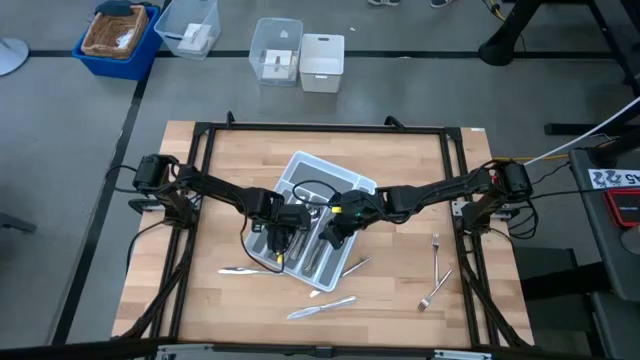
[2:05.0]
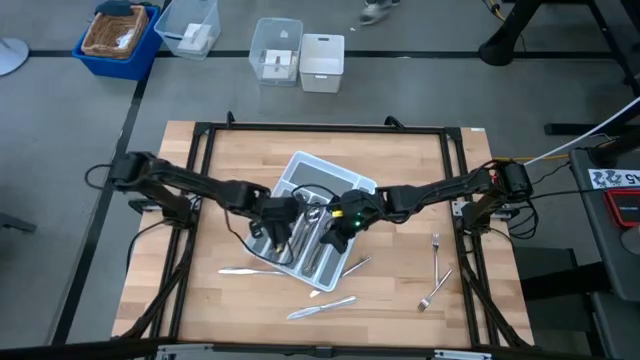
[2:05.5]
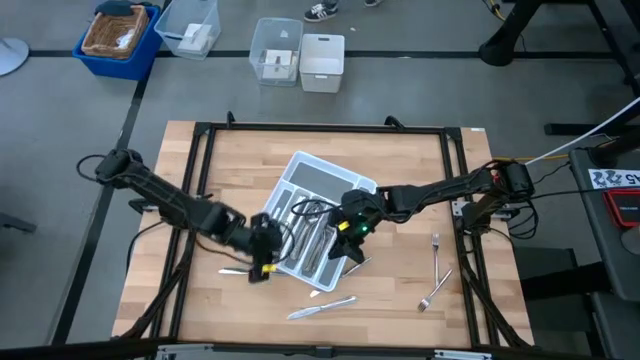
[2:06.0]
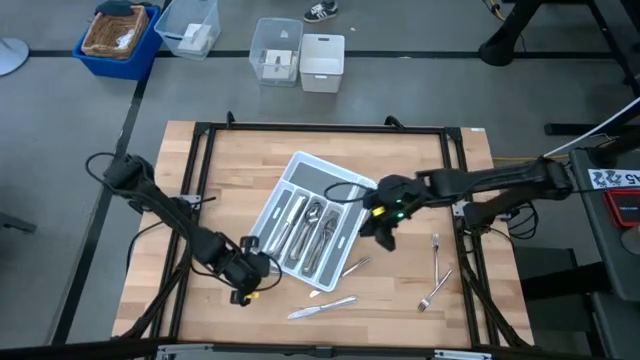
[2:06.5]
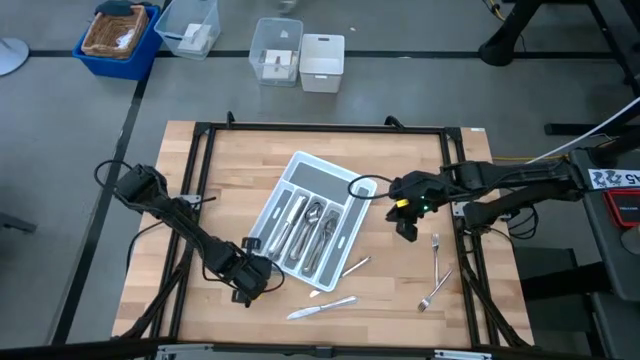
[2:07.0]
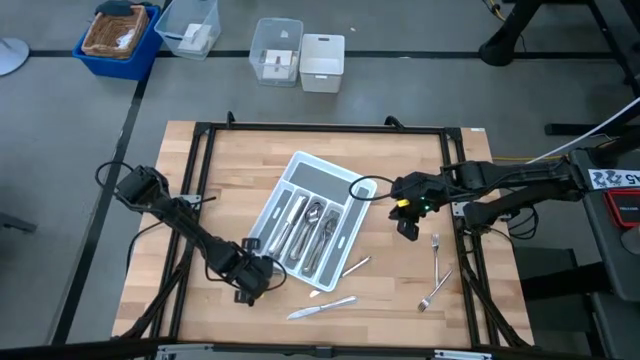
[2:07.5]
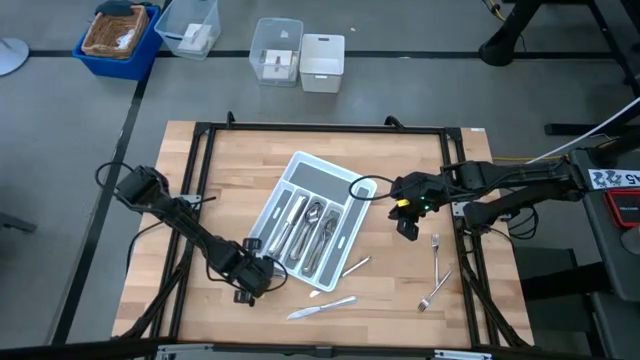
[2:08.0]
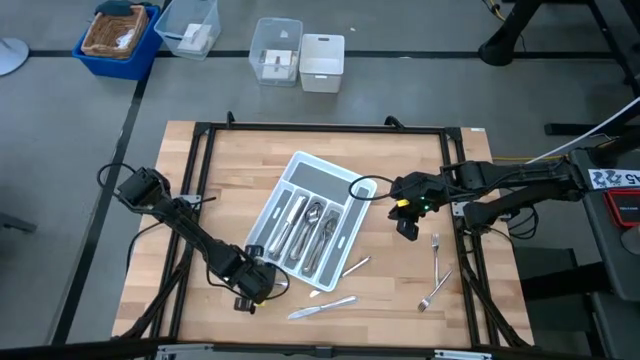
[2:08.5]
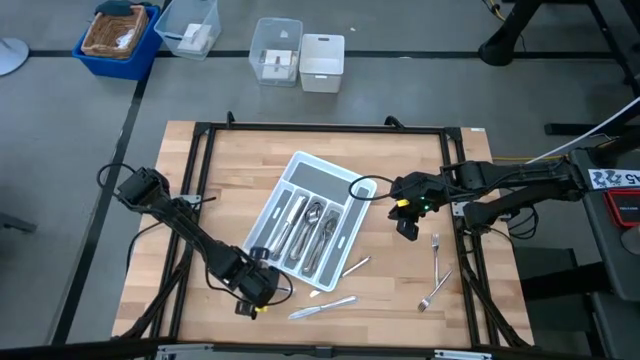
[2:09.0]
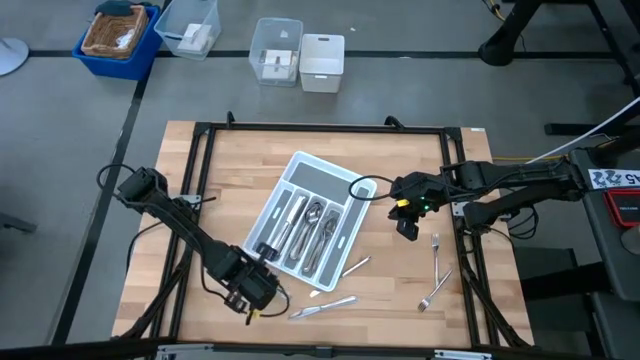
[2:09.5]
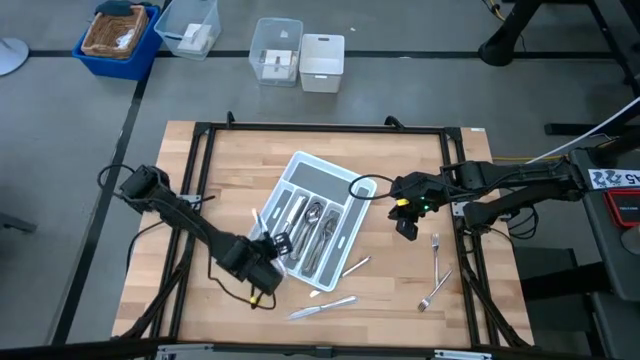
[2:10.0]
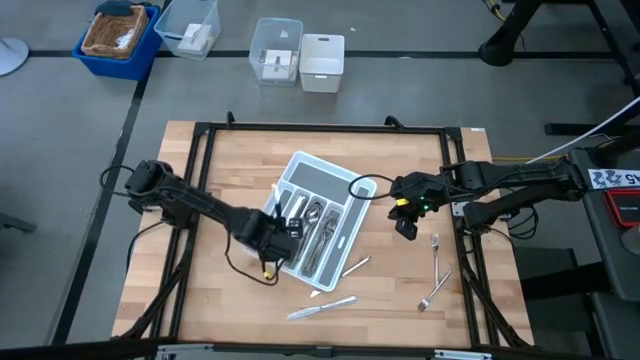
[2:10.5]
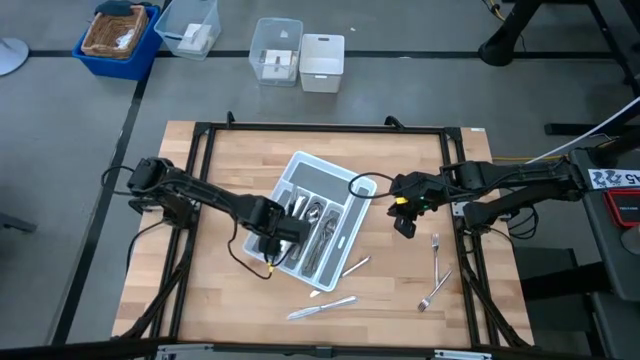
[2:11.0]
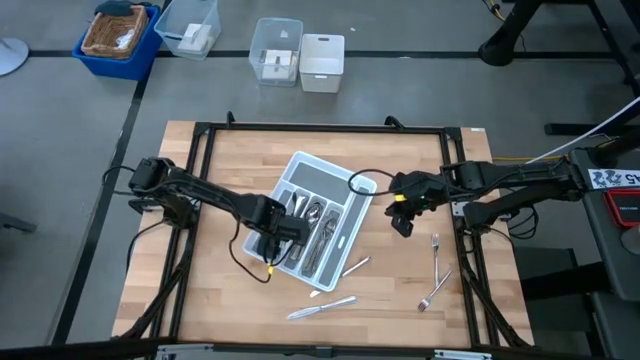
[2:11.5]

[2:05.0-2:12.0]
Task: Sort silverware
Put the silver knife into the white cutlery tray

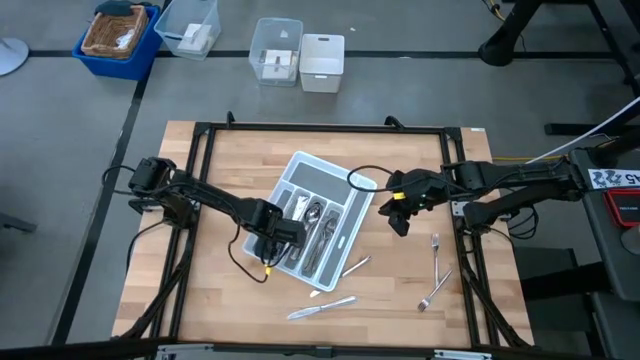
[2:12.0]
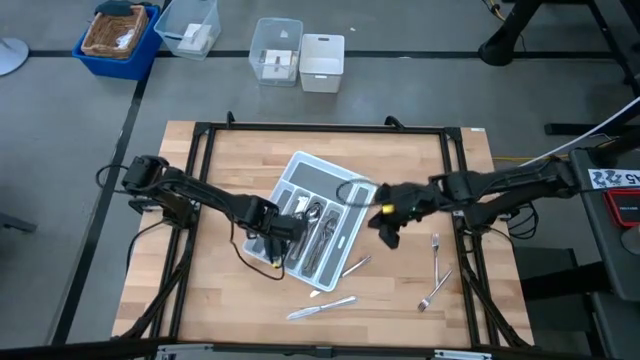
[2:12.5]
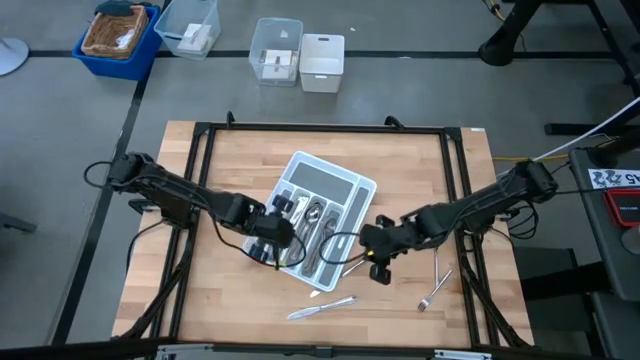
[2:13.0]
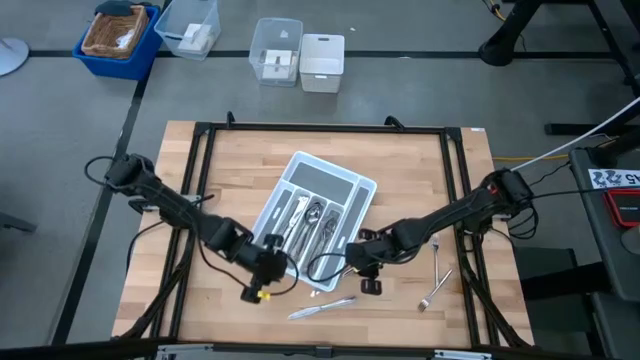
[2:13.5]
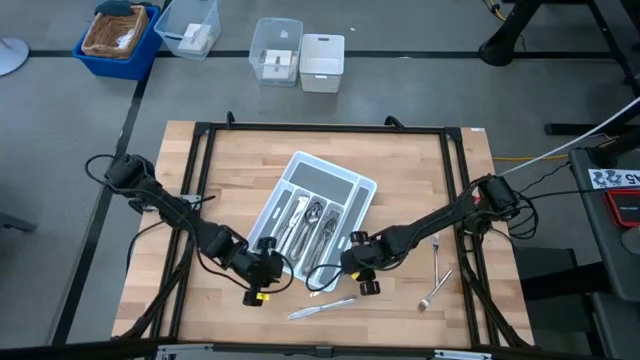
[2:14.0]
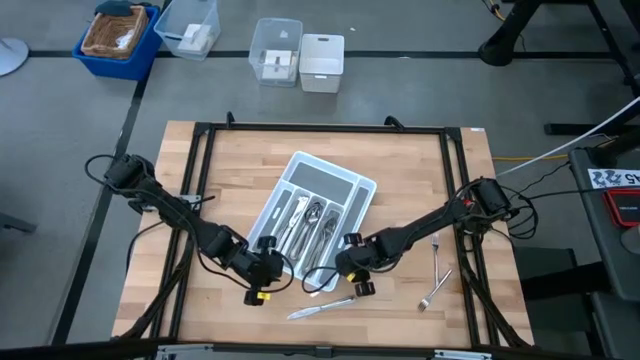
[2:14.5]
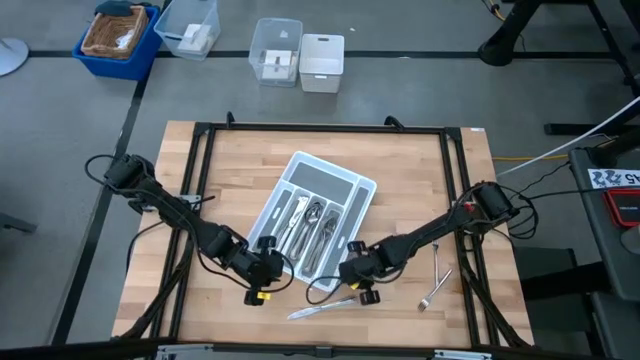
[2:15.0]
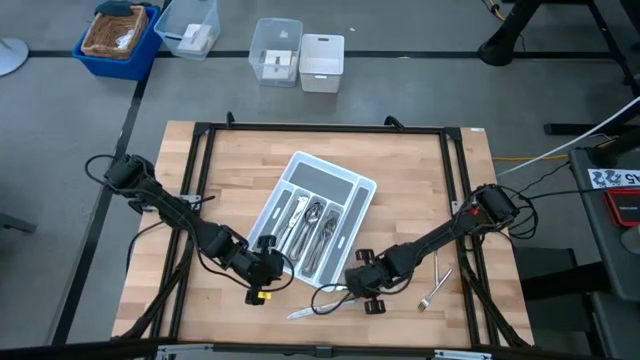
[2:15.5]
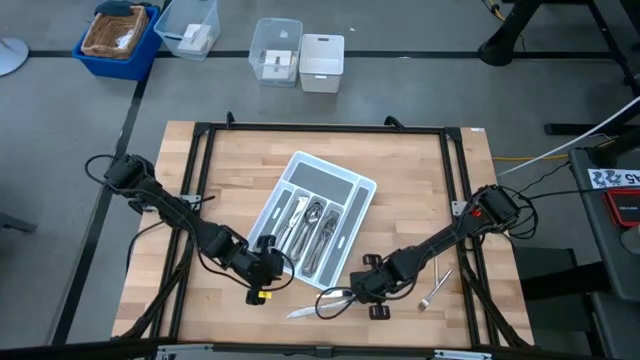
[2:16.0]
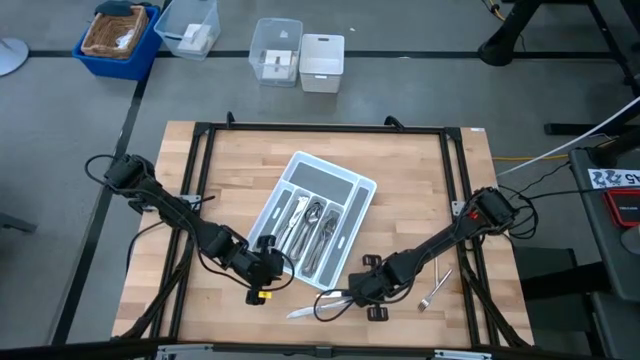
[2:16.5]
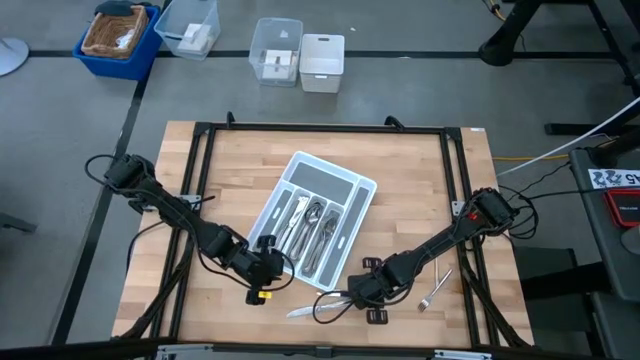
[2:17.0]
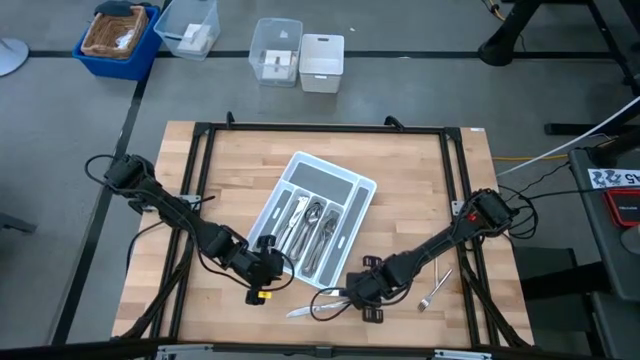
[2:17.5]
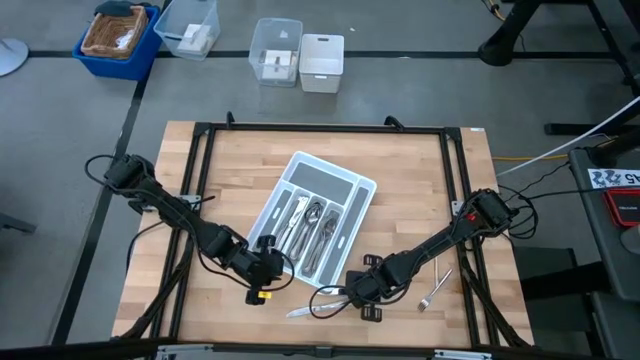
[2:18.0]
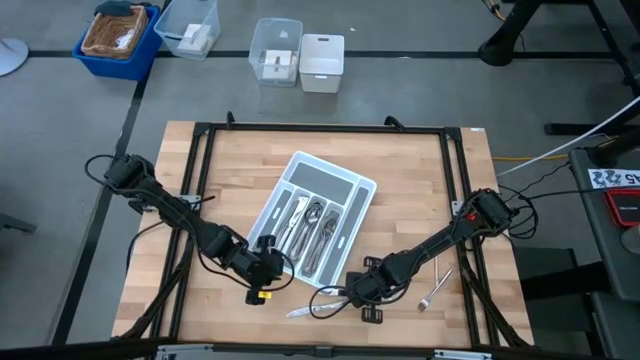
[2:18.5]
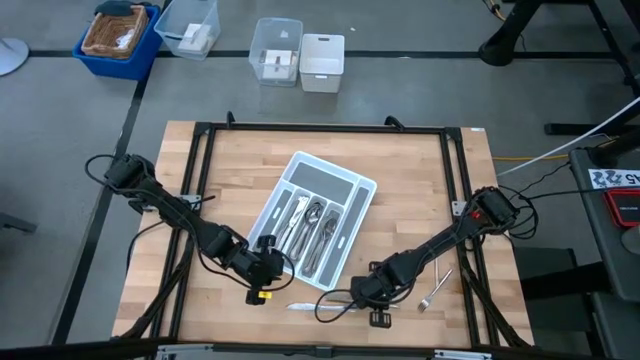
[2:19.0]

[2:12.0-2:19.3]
Put the silver knife into the white cutlery tray

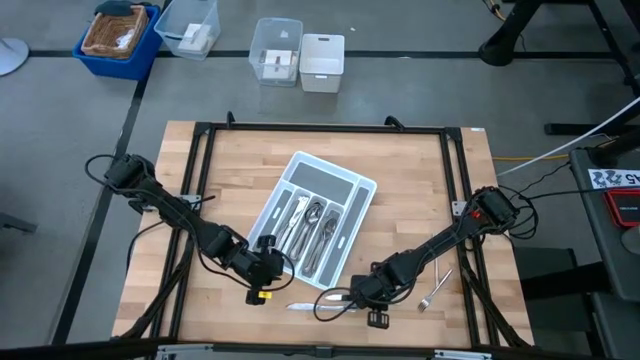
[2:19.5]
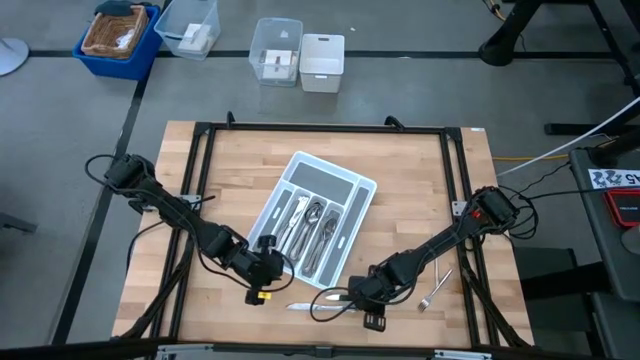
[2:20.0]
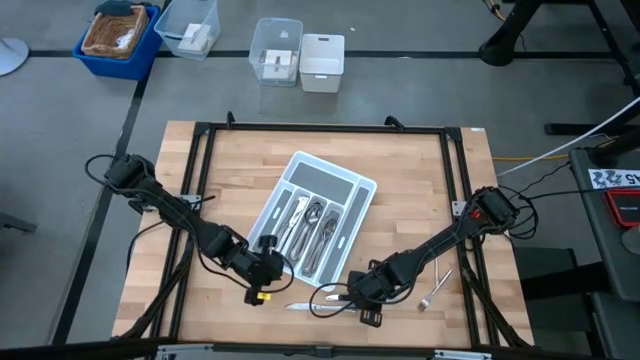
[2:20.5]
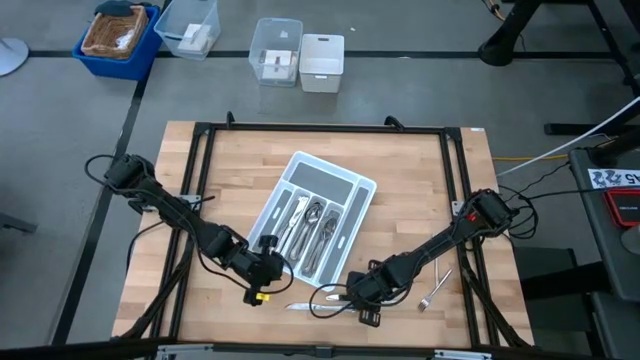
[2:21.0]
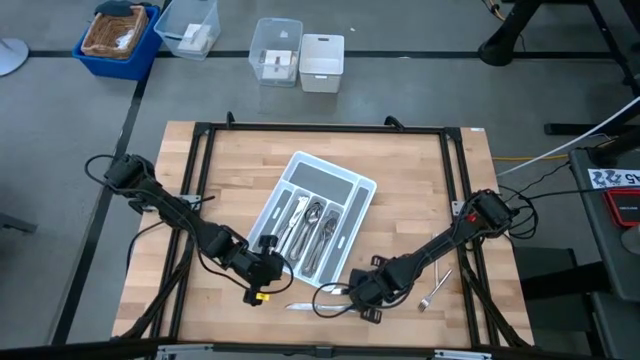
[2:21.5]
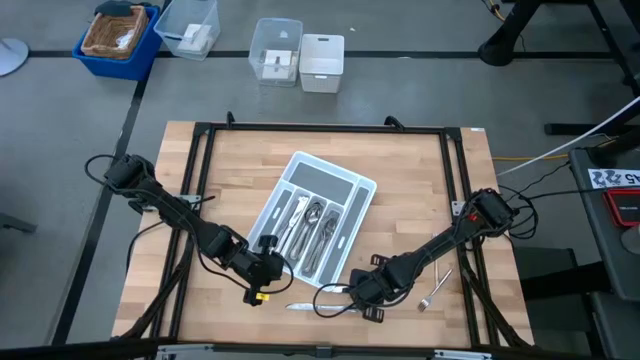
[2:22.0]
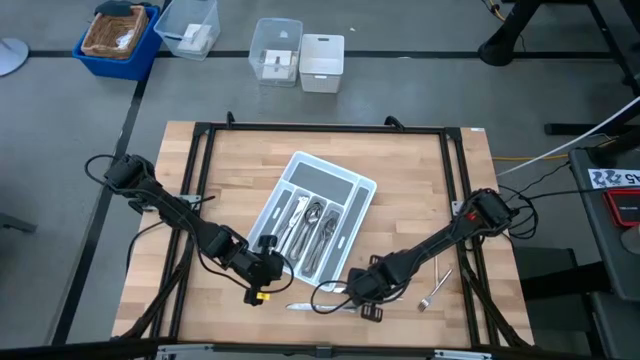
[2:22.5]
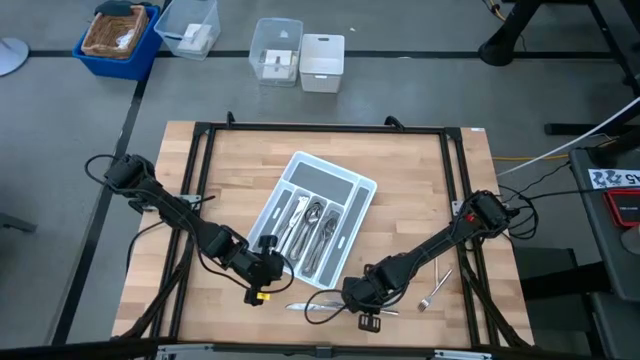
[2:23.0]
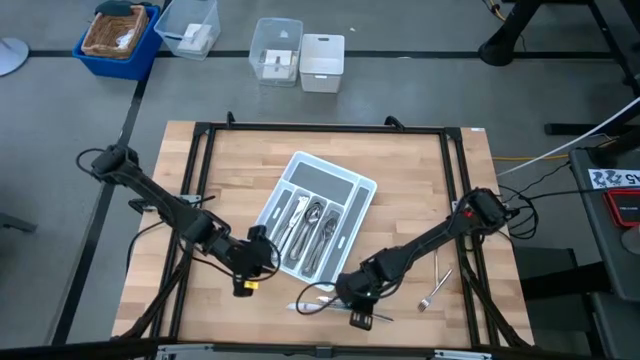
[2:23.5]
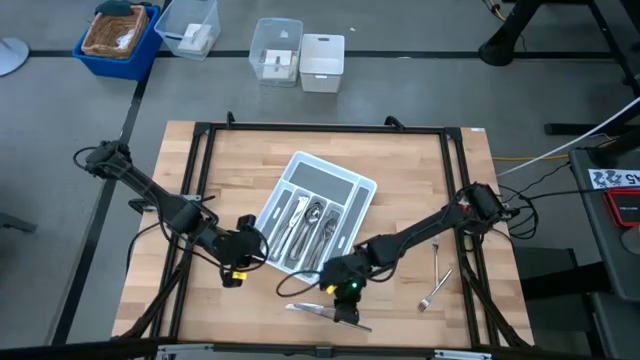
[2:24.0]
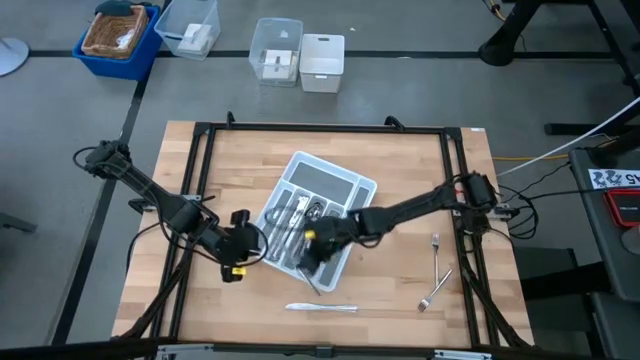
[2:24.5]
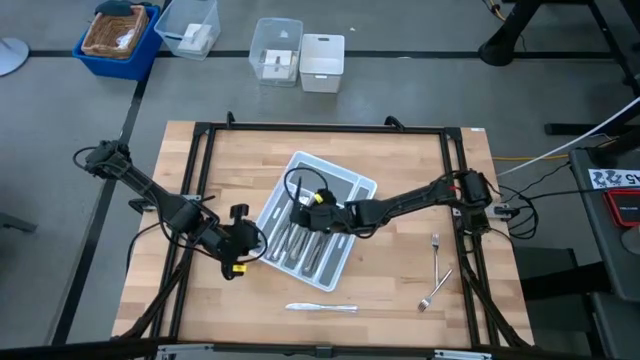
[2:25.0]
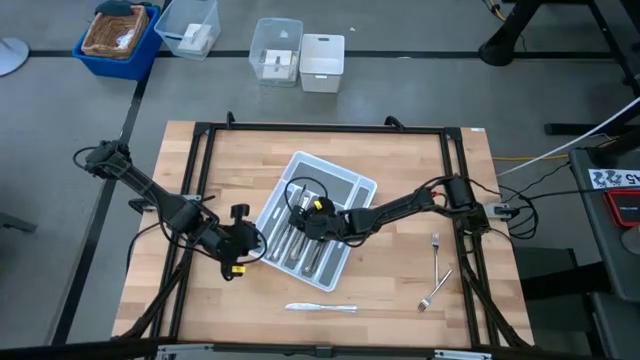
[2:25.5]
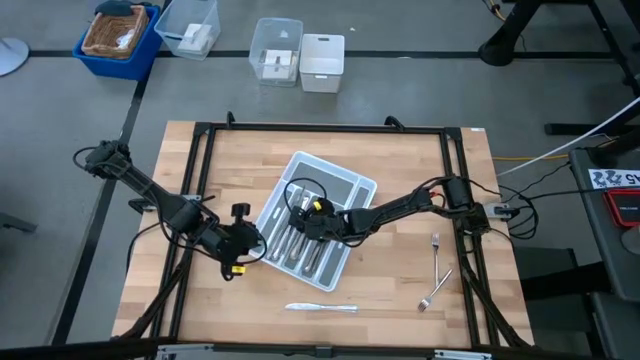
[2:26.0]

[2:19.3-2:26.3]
Put the silver knife into the white cutlery tray
